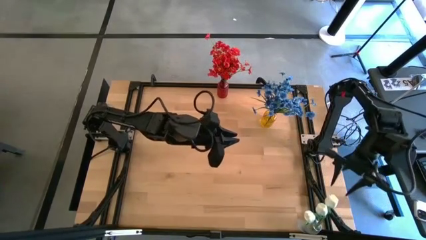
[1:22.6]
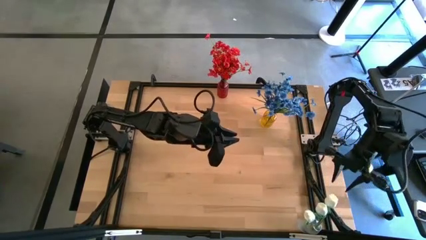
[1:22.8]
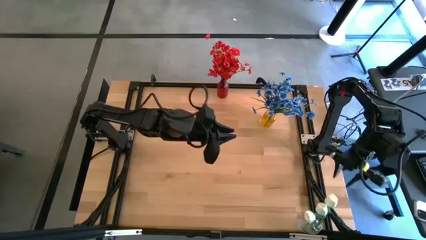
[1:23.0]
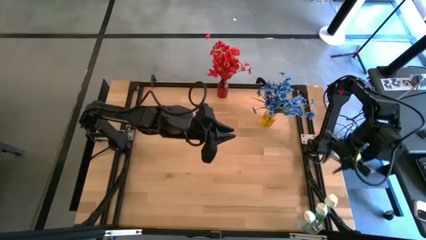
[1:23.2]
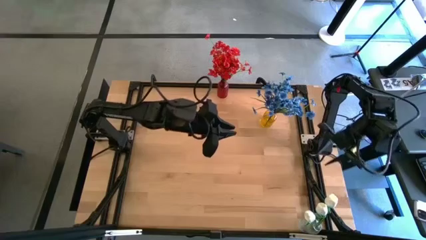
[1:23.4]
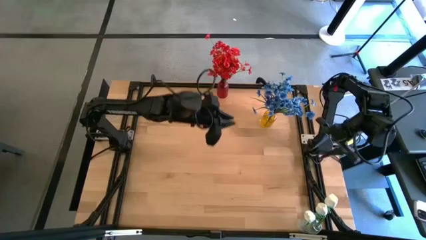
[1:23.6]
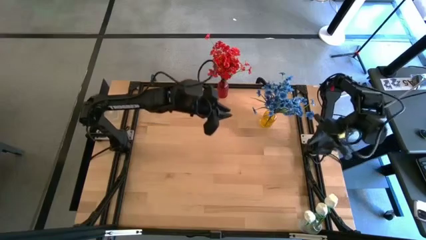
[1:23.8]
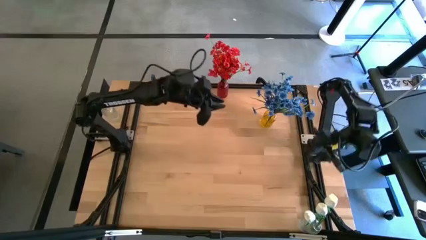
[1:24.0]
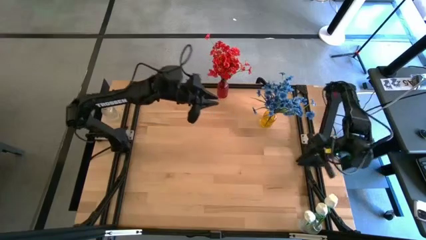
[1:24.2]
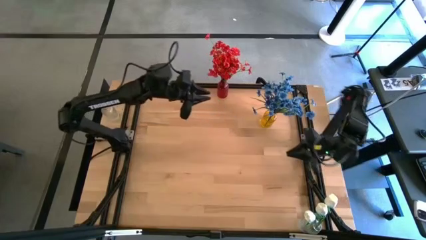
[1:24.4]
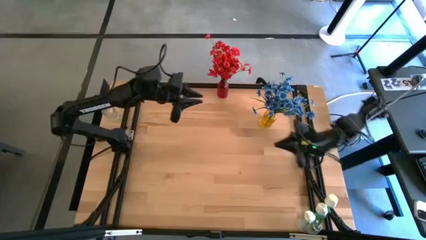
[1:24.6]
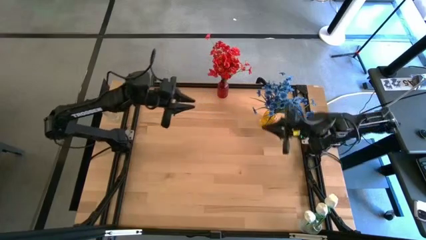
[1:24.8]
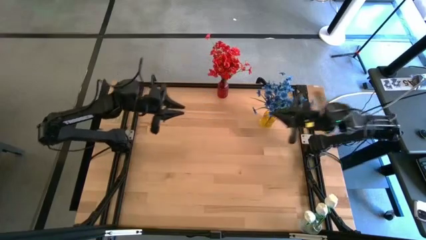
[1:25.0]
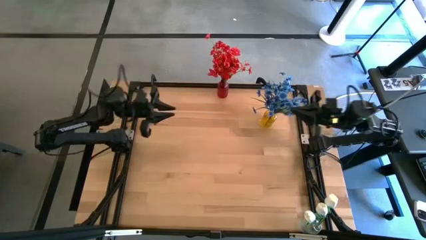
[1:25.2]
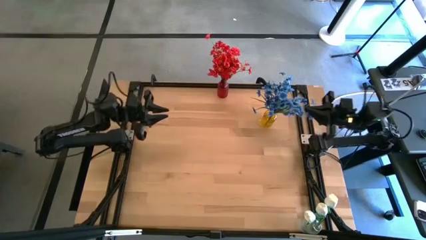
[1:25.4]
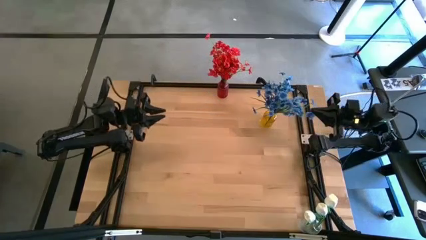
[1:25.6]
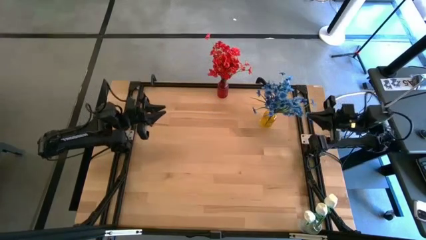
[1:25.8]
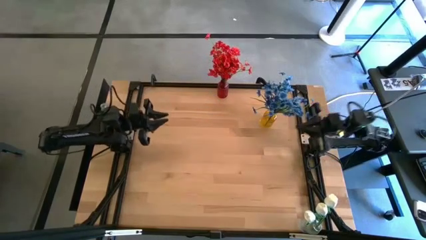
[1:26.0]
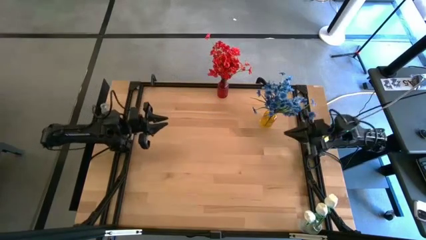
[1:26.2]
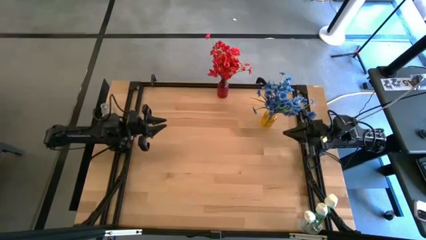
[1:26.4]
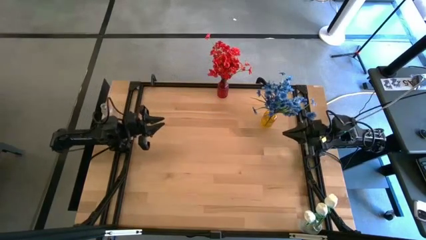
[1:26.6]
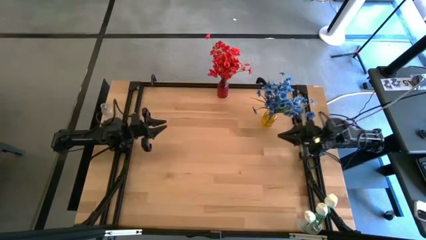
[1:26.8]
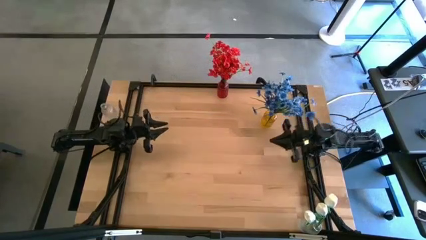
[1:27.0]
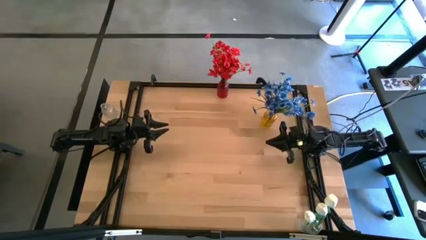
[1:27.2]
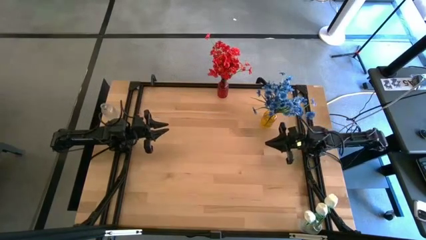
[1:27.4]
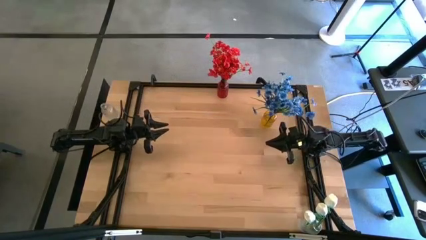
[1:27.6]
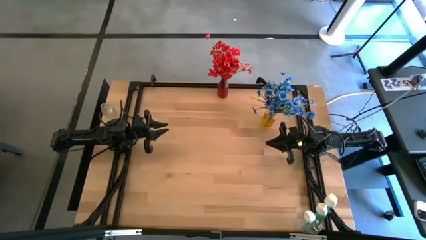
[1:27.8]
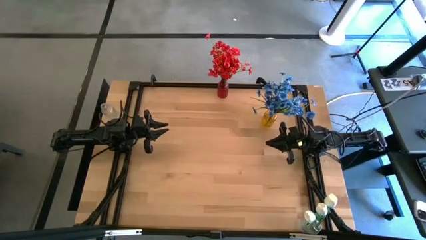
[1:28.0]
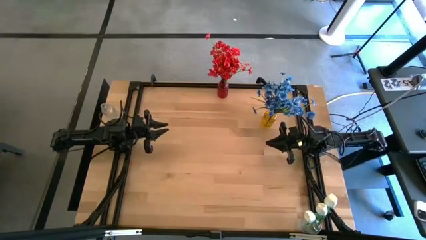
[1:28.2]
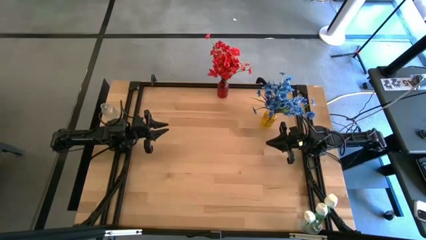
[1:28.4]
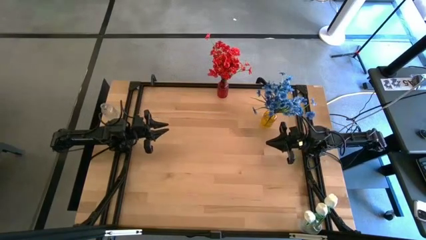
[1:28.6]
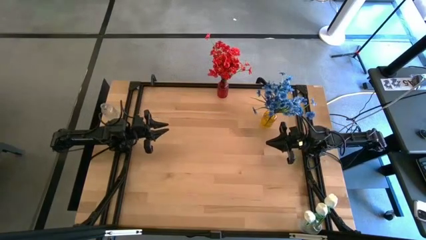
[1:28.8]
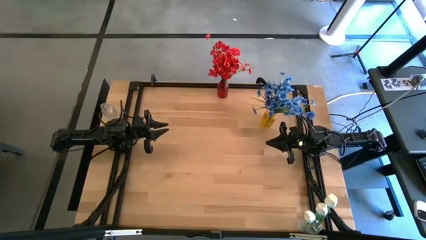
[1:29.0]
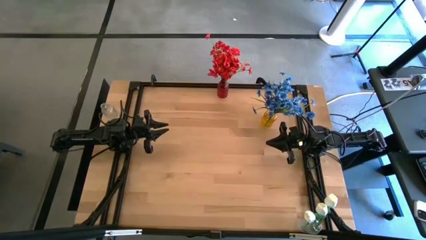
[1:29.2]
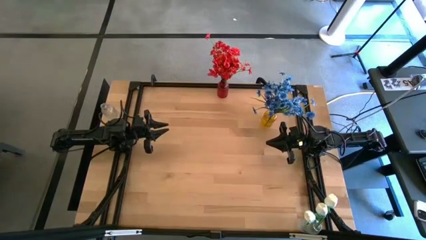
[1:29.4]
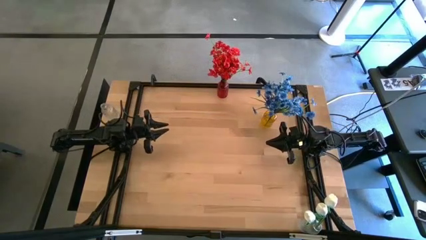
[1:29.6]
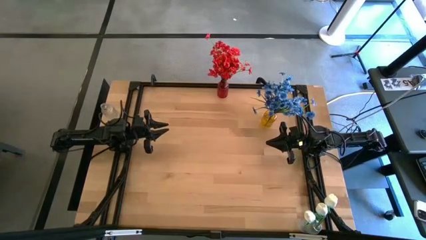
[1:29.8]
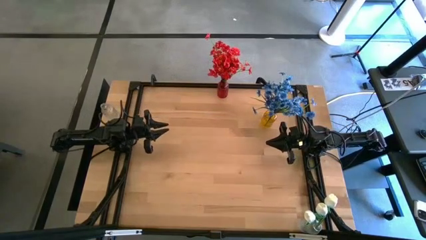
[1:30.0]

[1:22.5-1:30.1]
Task: Sort flowers into vase by color
Return to Home Position

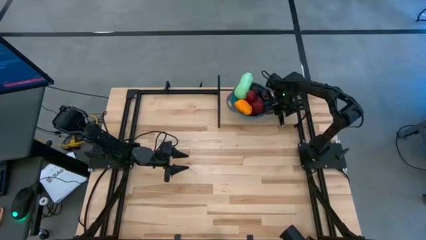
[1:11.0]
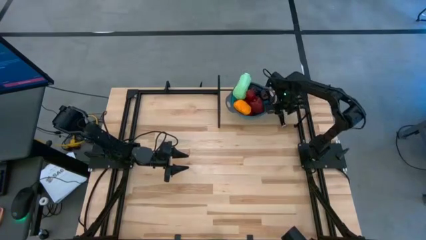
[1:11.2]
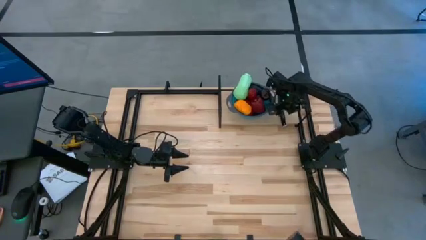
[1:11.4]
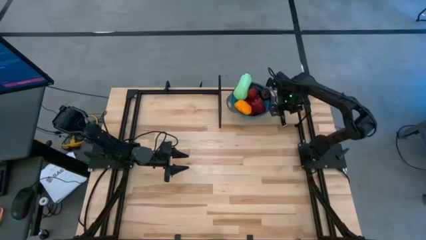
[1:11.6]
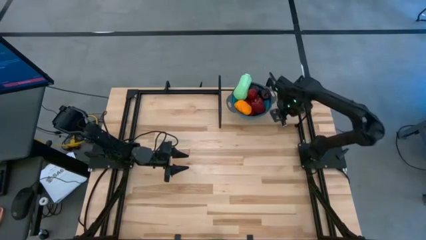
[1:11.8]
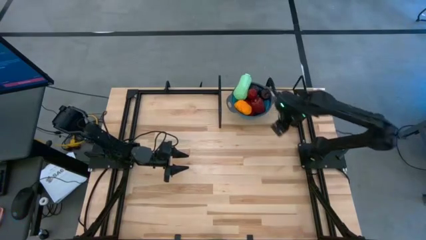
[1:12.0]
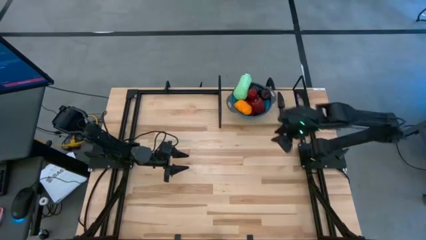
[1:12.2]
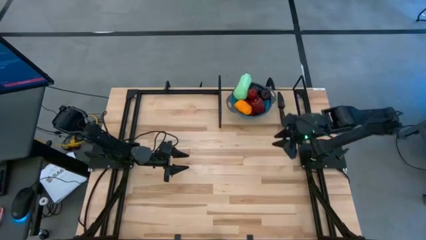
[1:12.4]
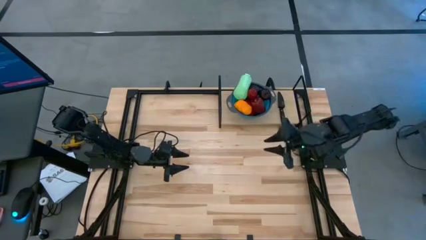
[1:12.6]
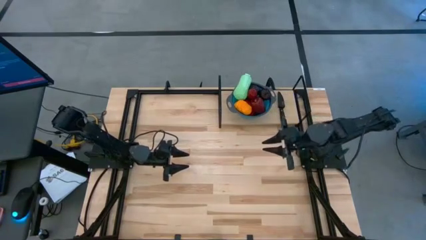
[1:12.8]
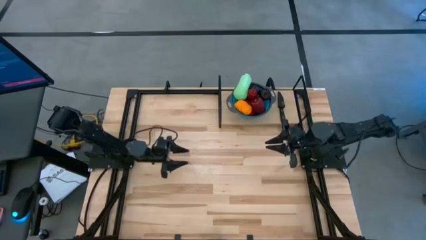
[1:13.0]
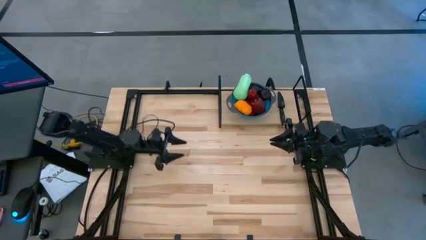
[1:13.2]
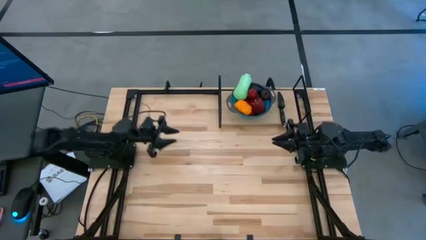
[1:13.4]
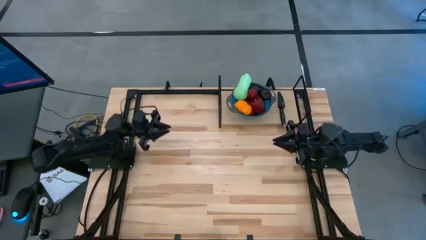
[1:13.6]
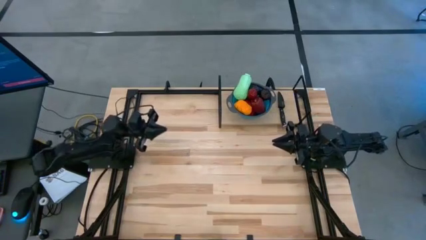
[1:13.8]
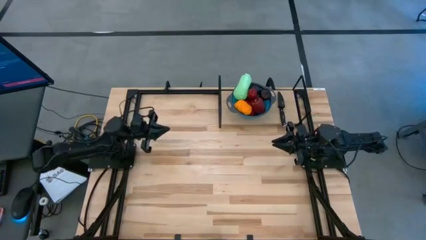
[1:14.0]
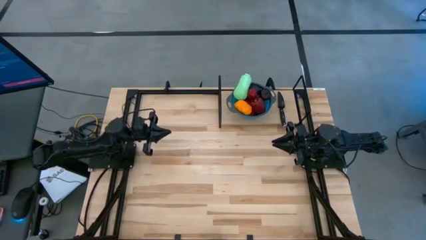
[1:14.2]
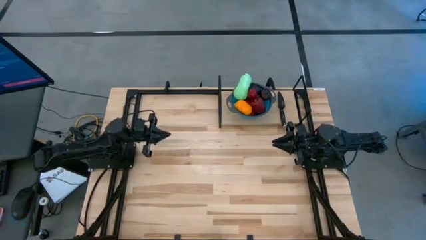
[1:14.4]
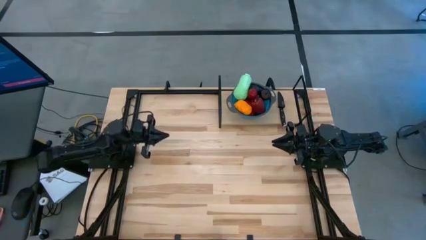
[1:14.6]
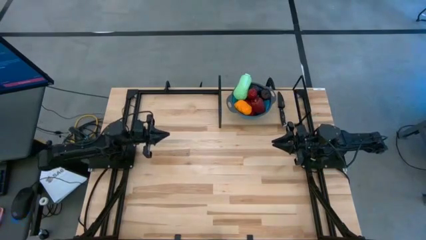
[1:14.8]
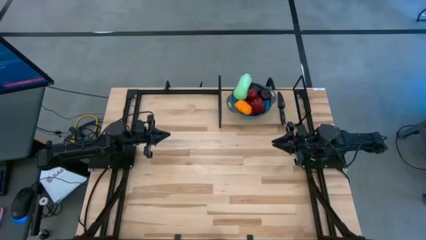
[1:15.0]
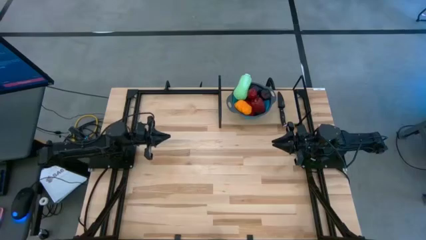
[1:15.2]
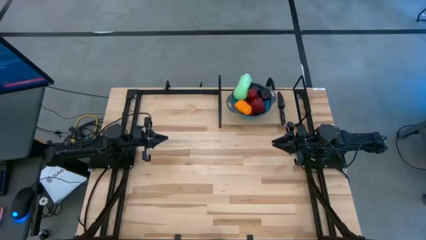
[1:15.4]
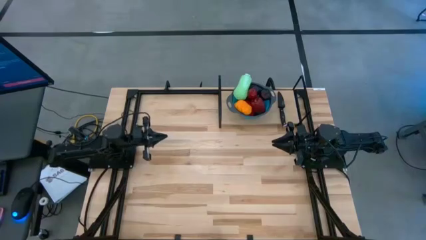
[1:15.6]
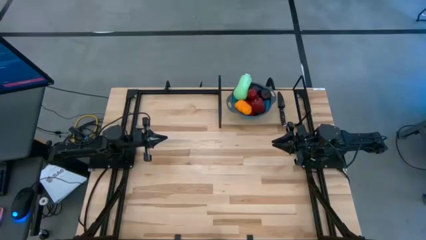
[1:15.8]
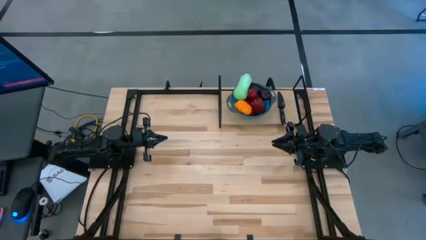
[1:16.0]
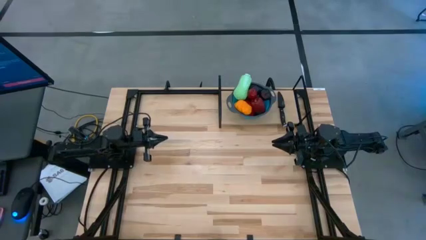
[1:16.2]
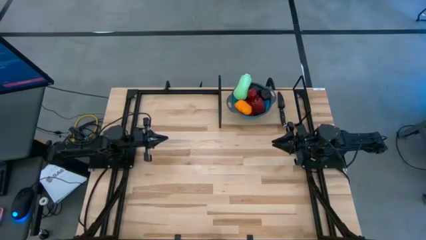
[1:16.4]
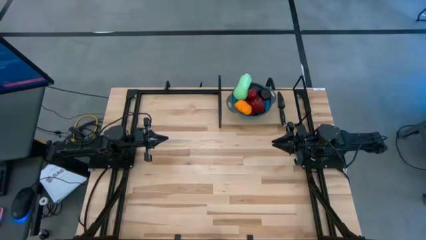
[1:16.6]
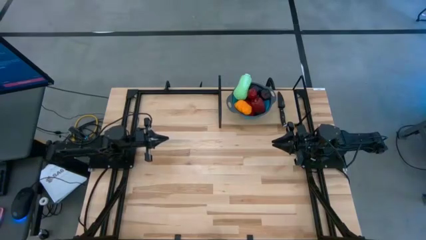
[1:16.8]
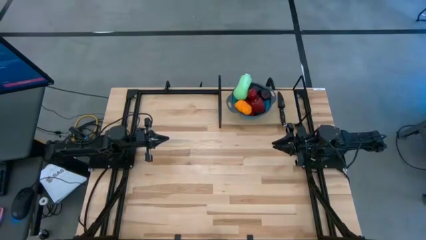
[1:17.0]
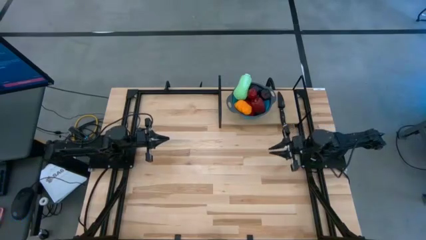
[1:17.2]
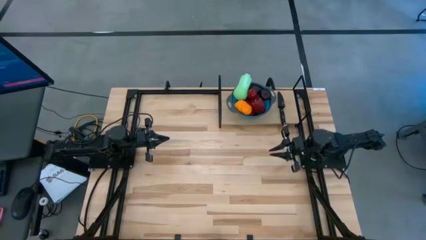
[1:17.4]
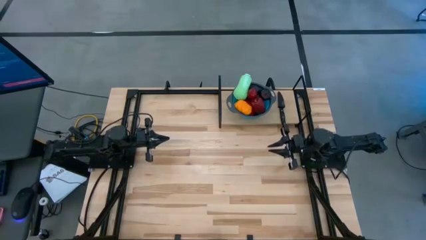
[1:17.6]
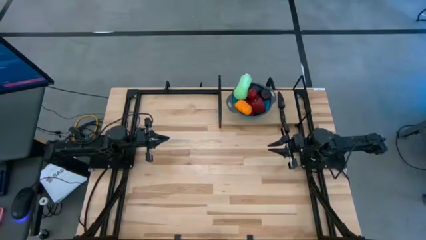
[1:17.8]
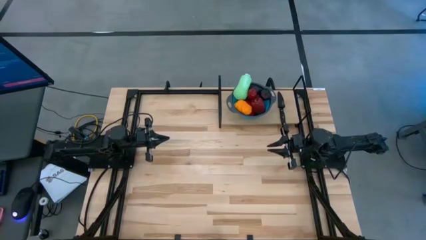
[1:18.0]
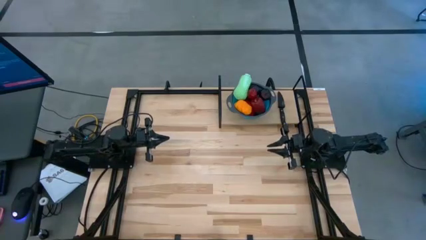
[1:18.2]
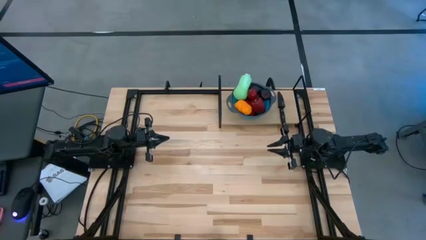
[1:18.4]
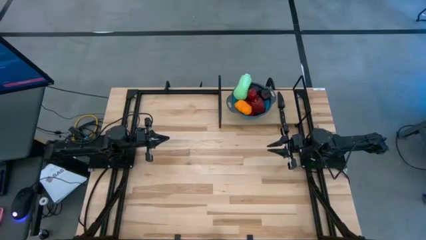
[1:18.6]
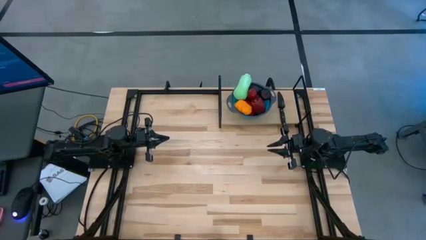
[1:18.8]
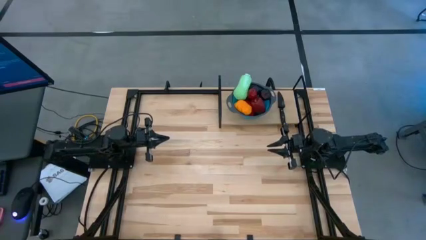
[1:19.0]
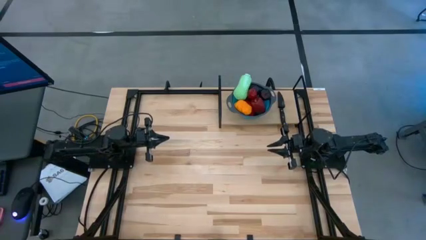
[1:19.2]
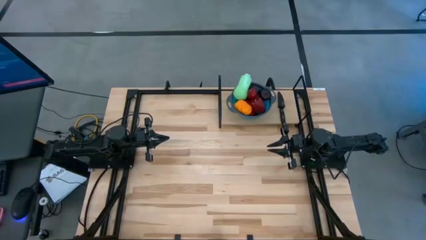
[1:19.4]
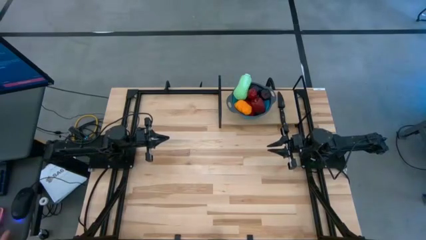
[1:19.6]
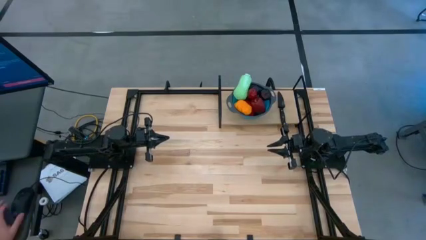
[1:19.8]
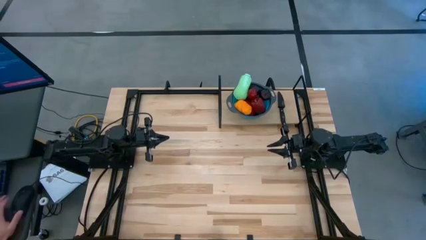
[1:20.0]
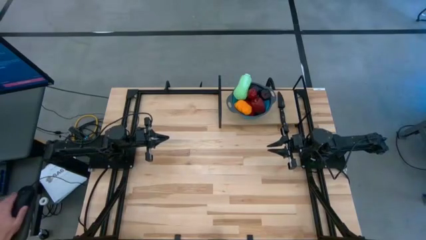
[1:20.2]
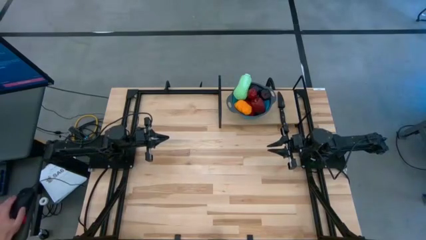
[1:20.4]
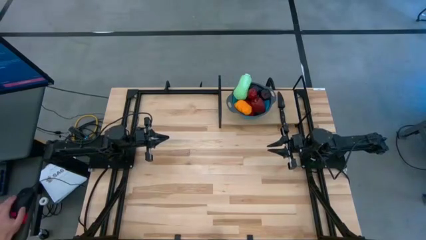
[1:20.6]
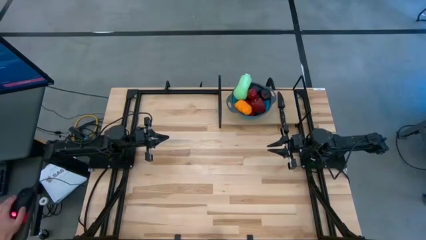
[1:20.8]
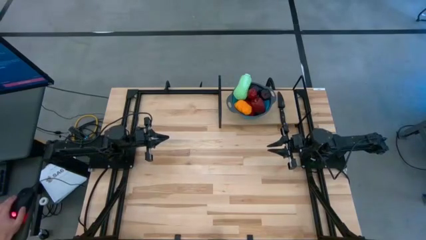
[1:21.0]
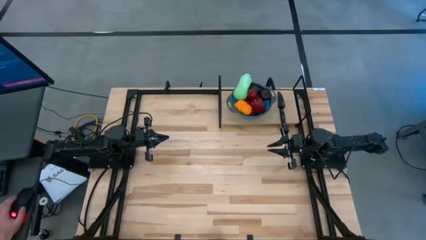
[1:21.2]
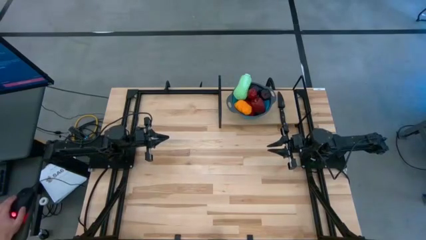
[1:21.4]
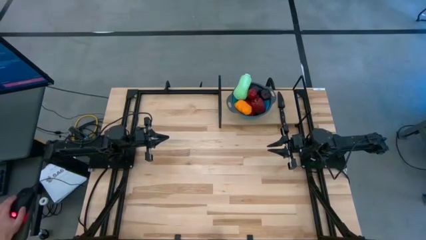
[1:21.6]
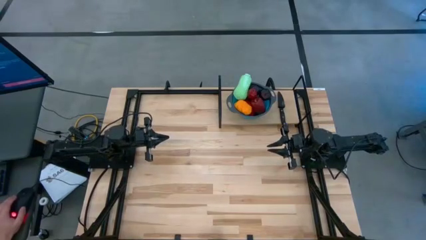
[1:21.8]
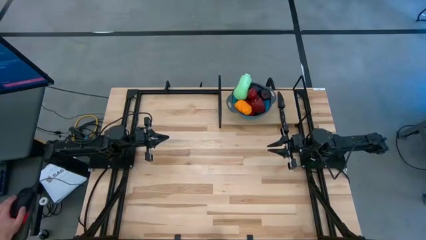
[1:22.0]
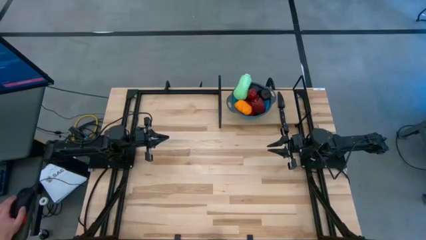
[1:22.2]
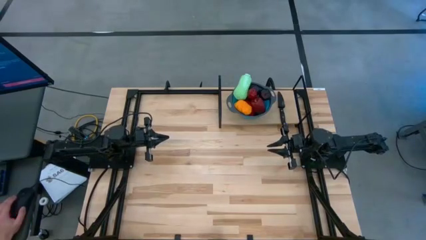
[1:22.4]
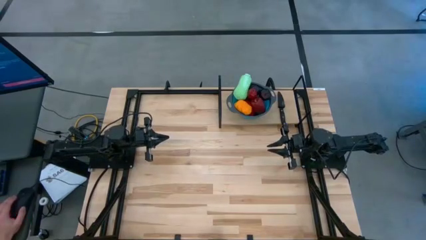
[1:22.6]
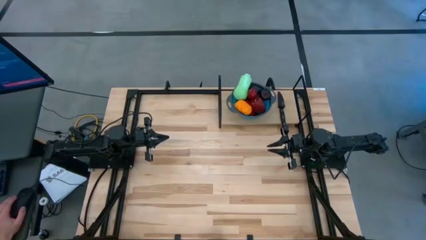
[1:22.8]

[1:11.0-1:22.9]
Task: Pick & Place Fruit
Return to Home Position
